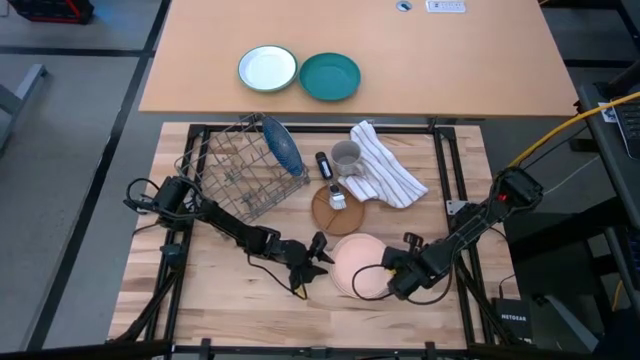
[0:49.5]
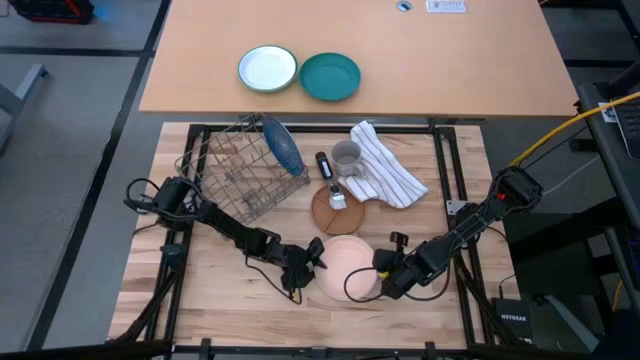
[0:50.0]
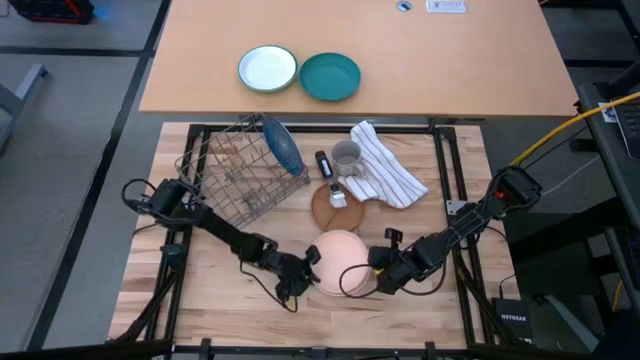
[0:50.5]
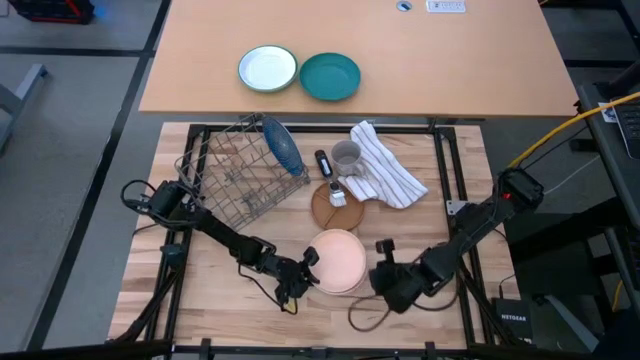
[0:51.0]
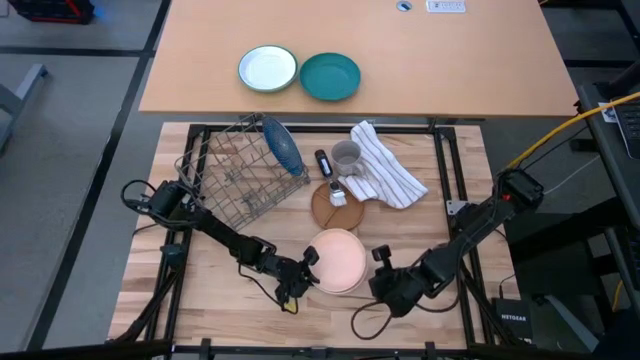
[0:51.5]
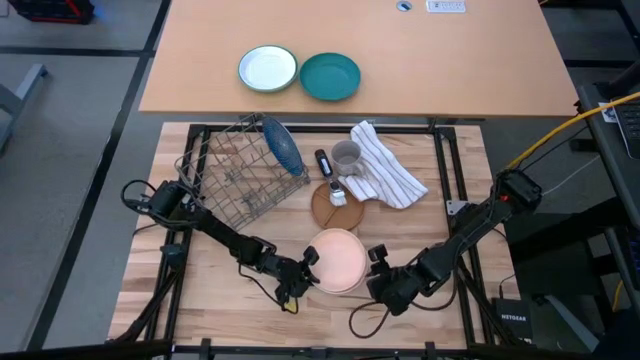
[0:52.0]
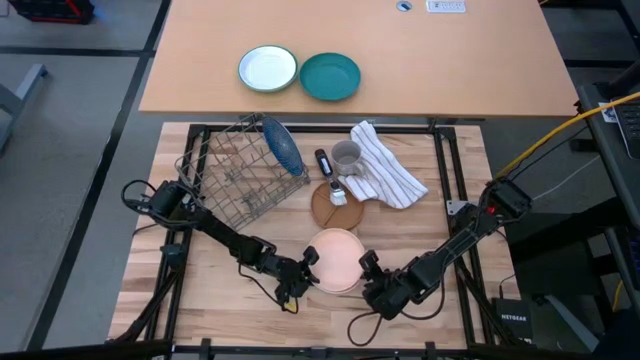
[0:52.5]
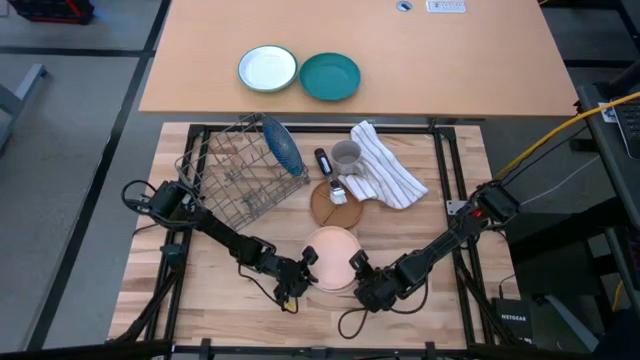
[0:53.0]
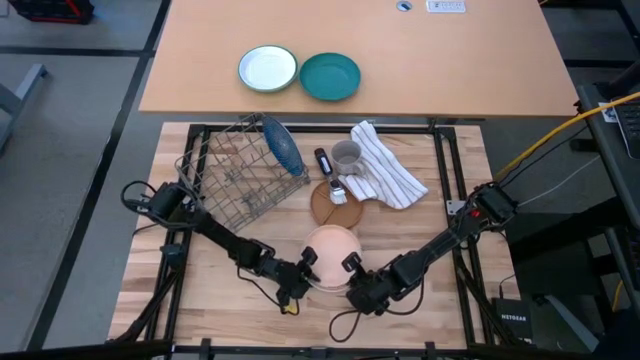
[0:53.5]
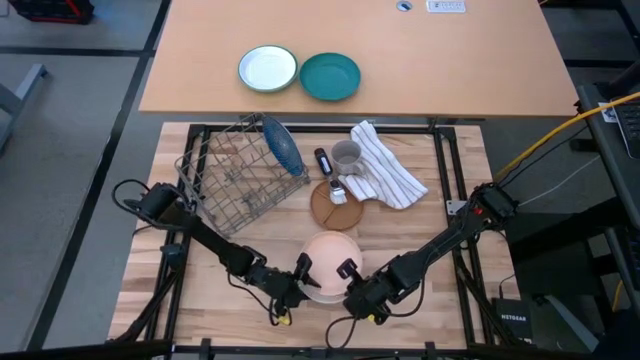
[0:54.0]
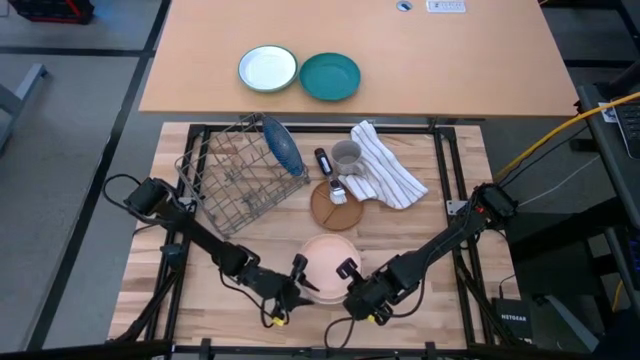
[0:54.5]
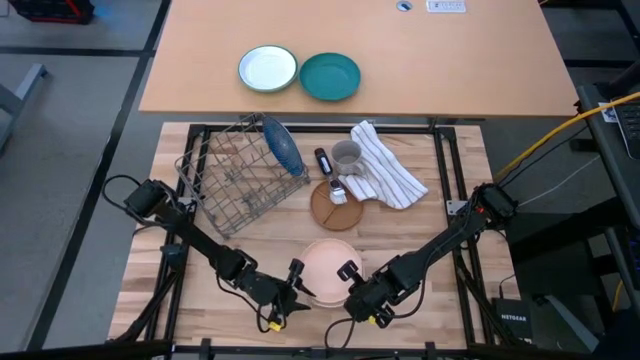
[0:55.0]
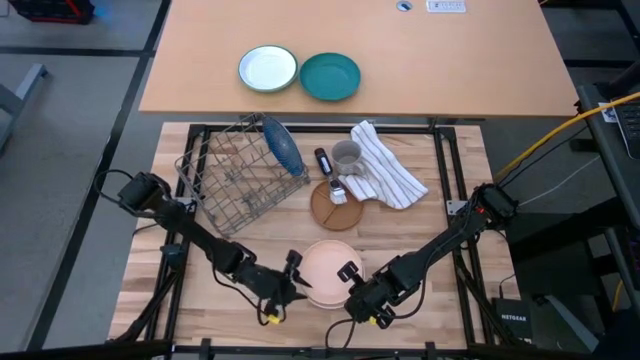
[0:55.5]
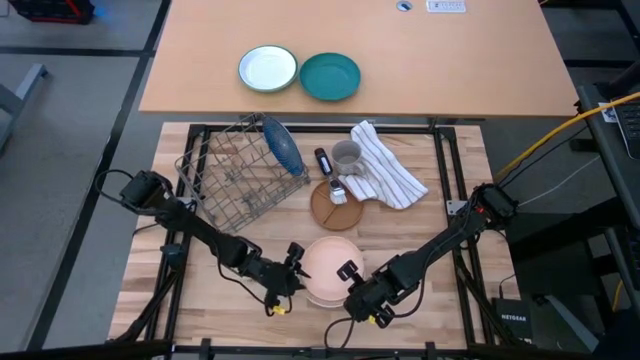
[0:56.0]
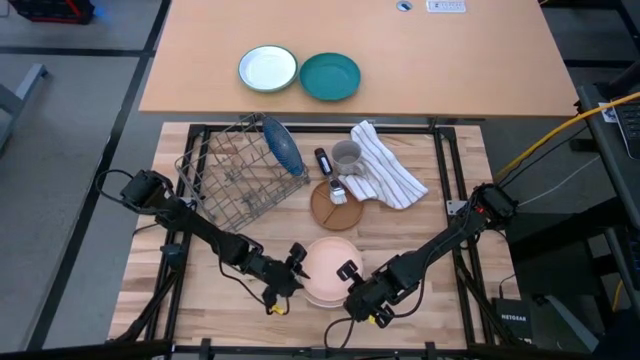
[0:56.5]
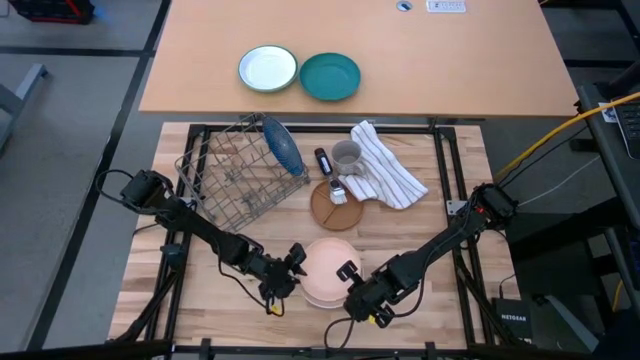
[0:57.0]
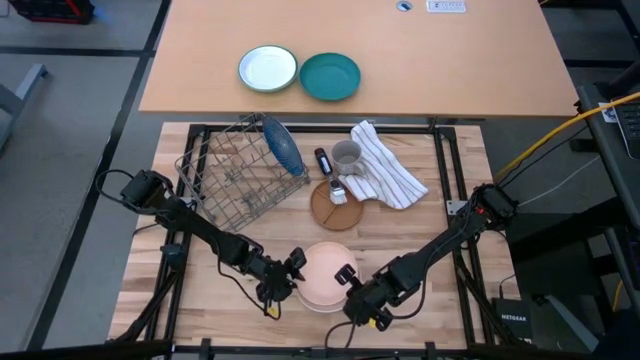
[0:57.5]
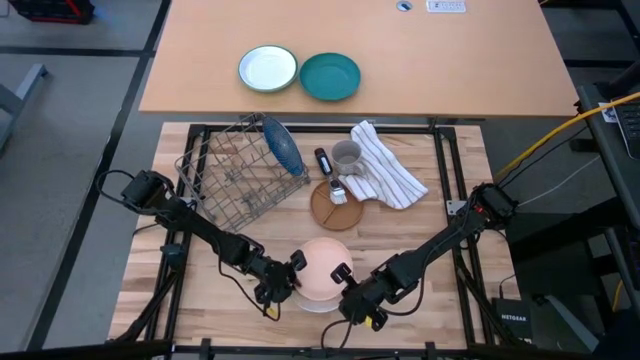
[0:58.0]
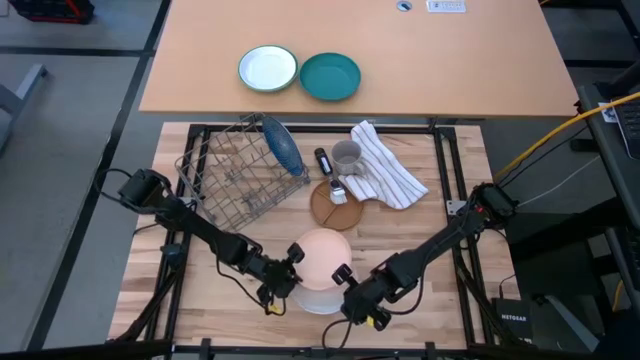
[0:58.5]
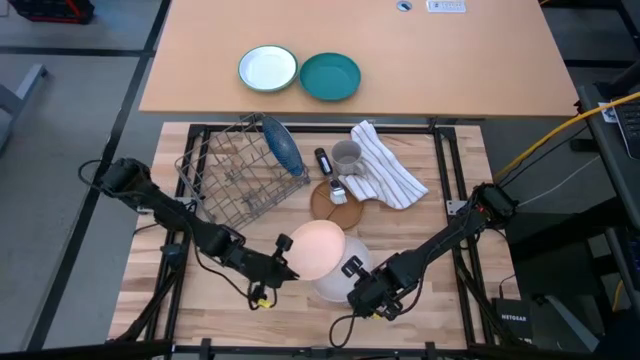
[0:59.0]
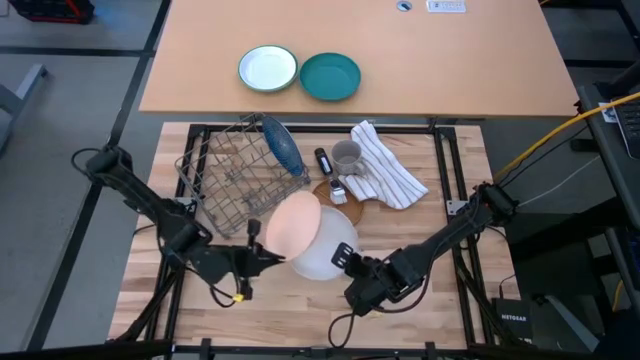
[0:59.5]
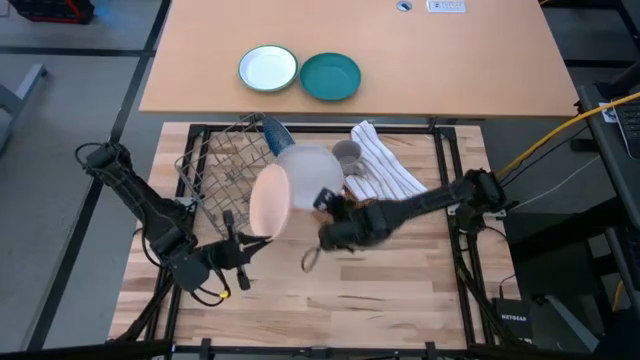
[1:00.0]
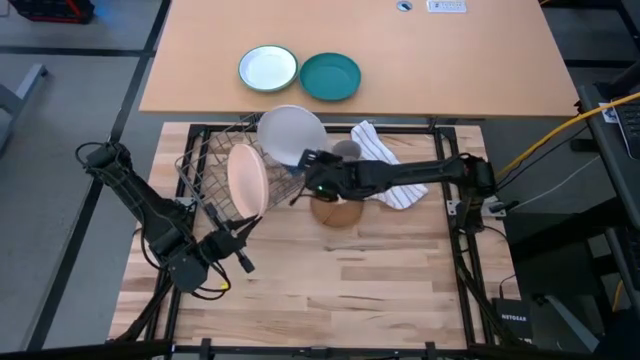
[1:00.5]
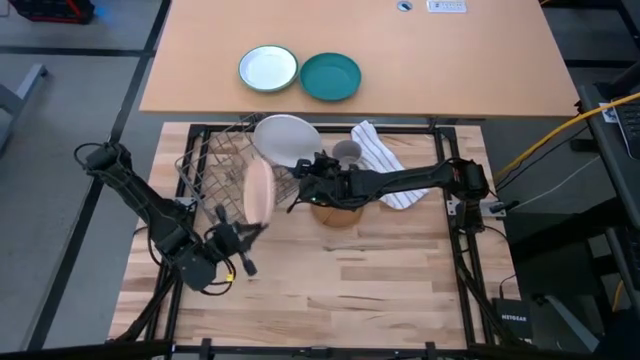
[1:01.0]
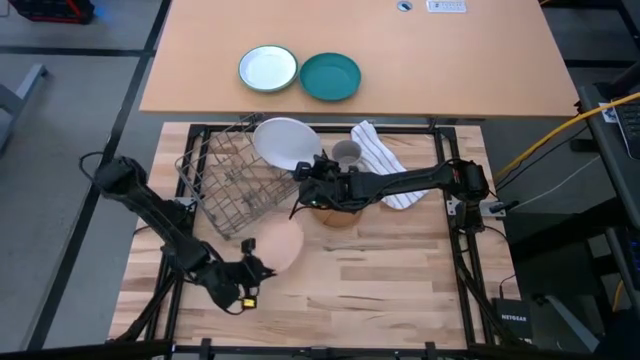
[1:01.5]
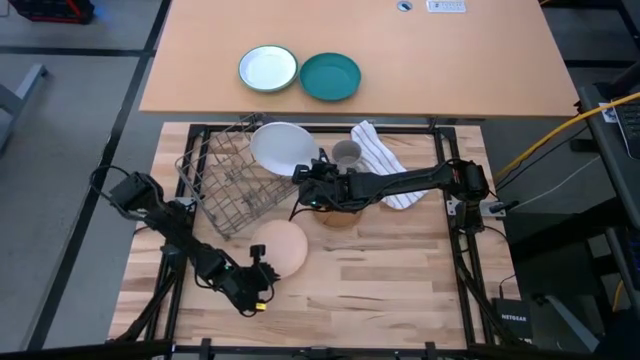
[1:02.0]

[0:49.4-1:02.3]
Task: Sort dishes
Put the light orange plate into the dish rack

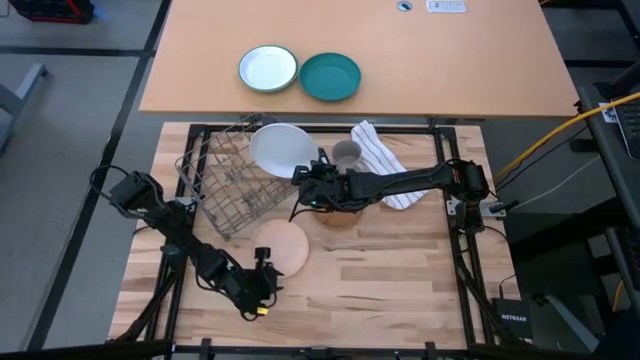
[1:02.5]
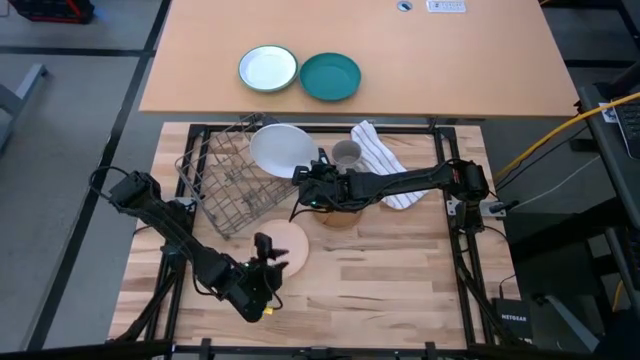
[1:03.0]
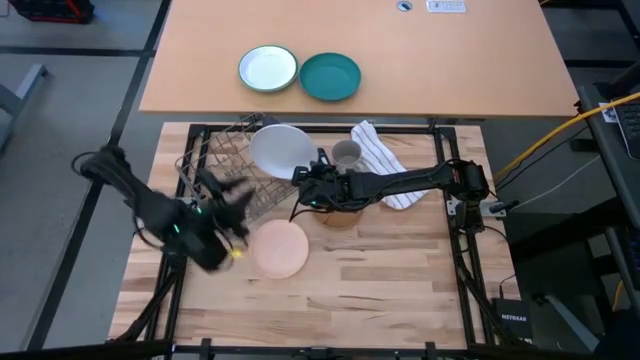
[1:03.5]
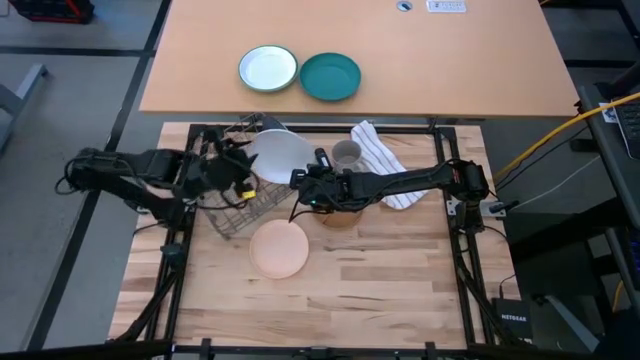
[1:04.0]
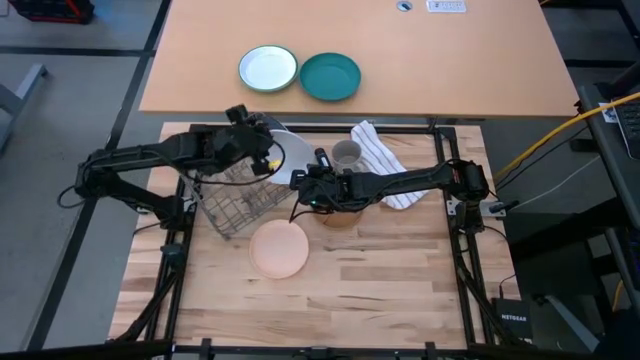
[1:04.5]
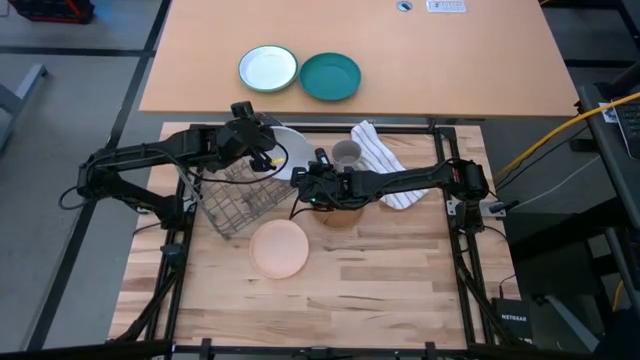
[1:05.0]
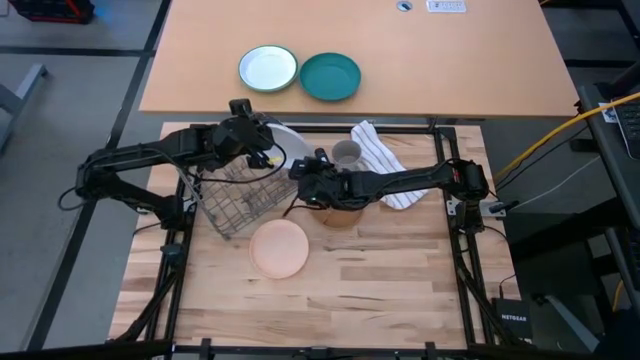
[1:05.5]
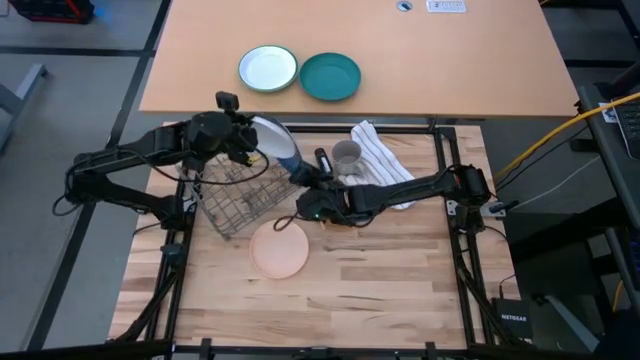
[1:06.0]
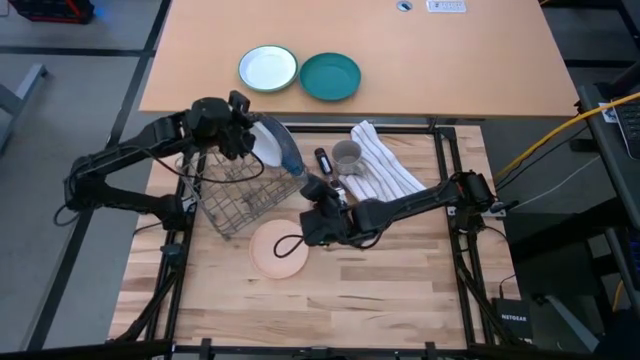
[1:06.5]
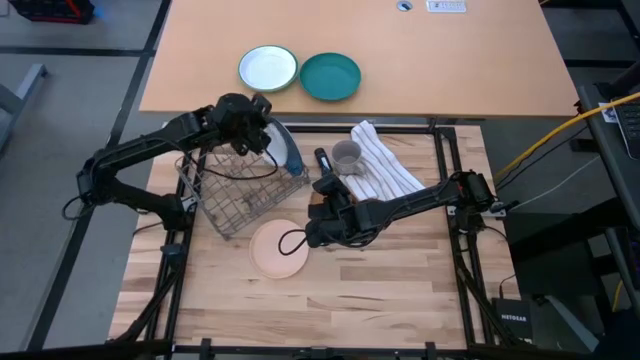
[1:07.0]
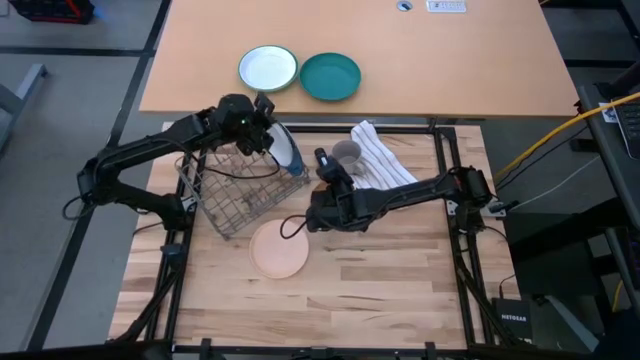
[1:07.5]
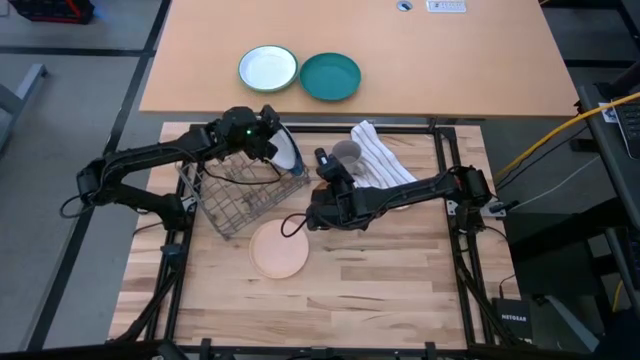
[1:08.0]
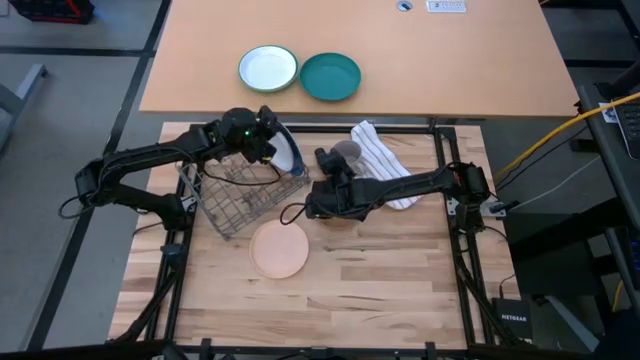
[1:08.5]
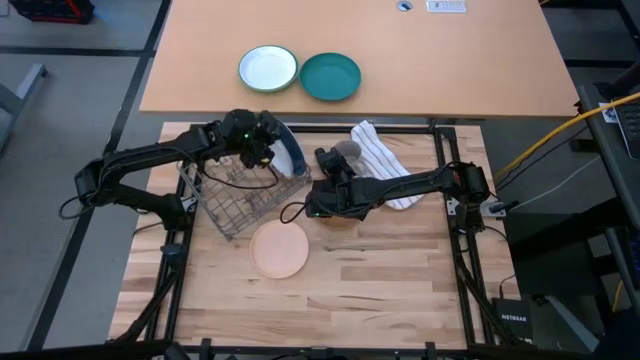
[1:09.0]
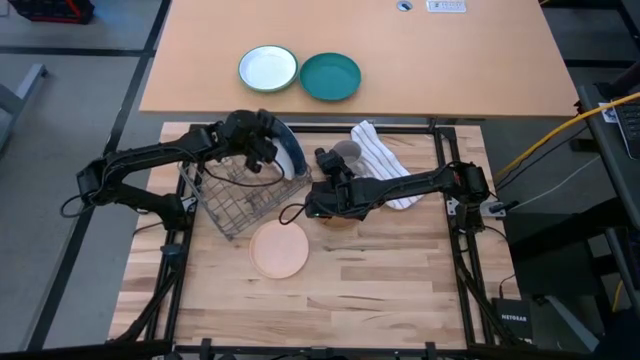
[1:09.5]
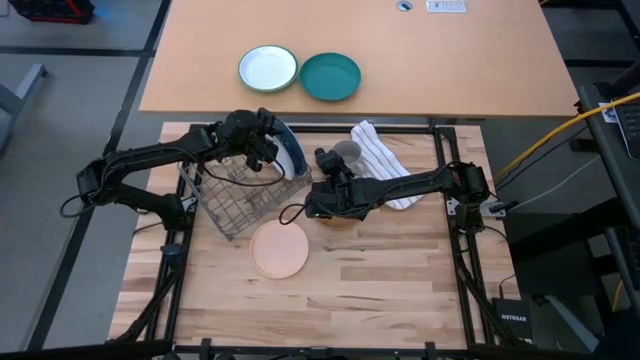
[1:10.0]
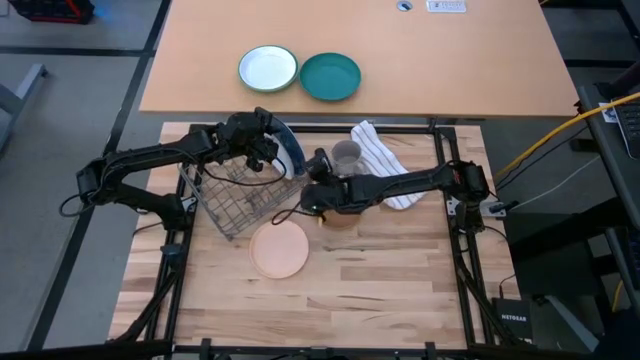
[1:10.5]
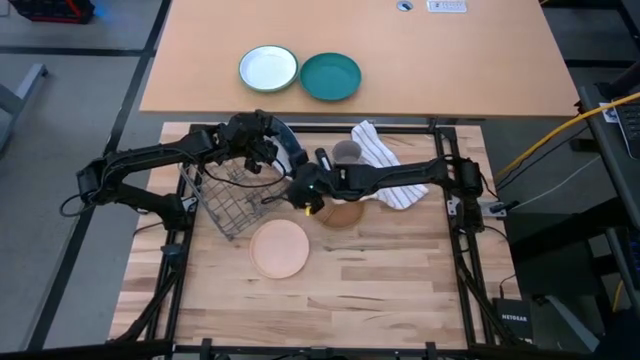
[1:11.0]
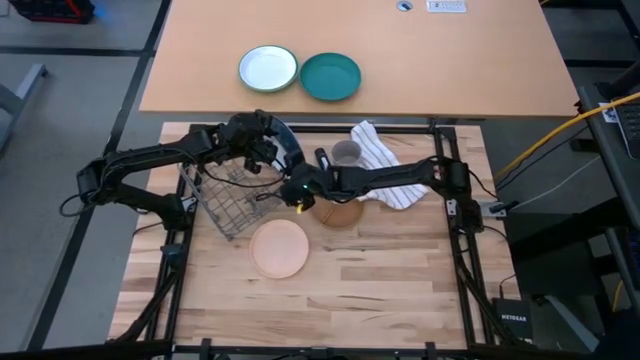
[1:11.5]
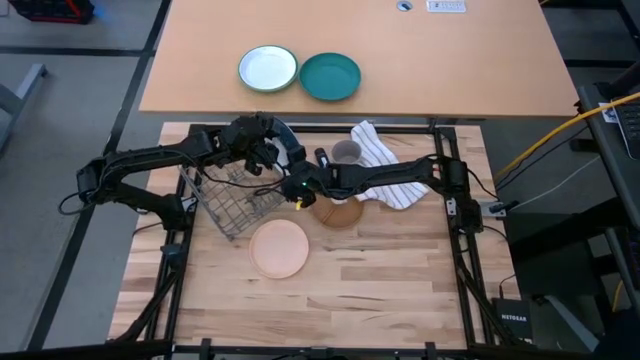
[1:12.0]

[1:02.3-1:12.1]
Put the white plate into the dish rack
